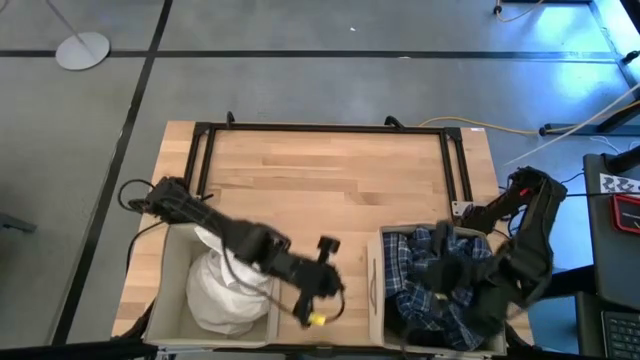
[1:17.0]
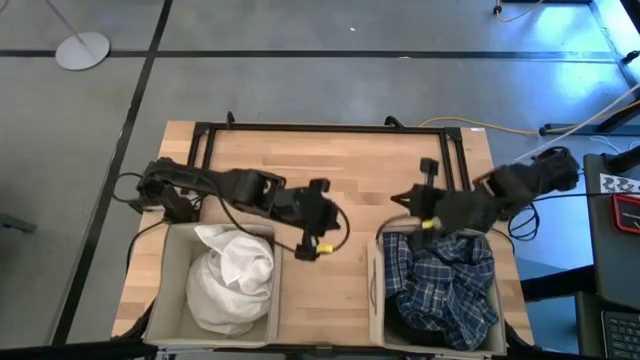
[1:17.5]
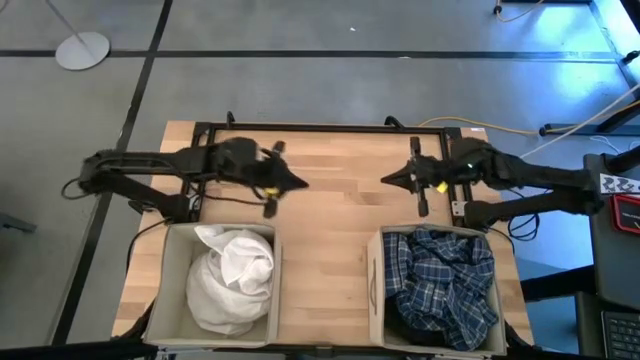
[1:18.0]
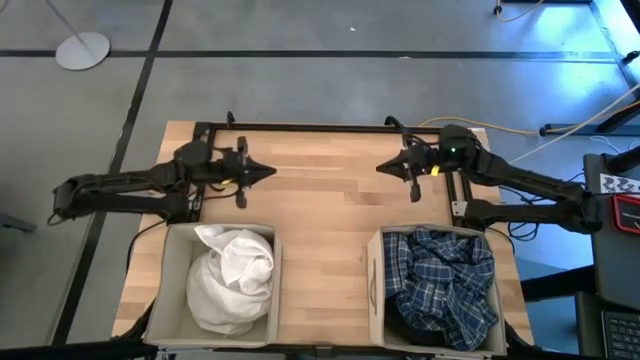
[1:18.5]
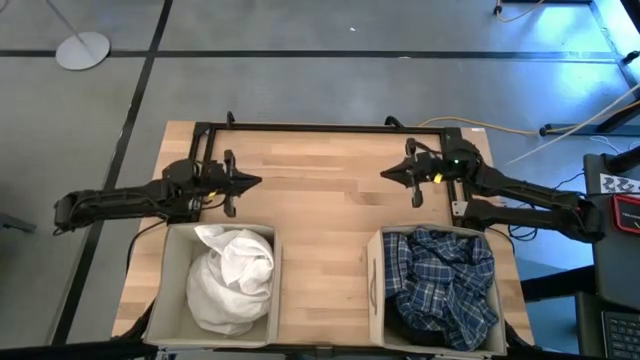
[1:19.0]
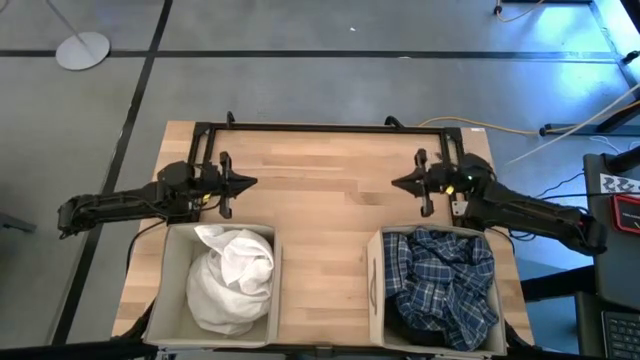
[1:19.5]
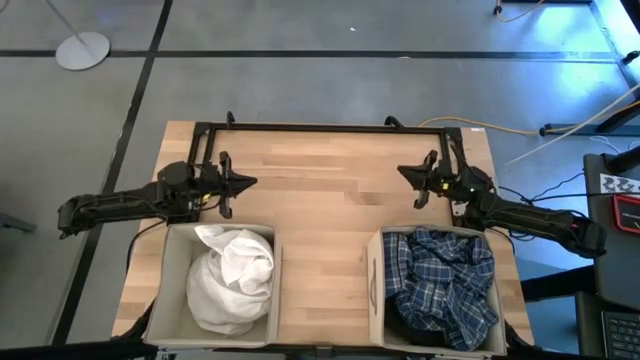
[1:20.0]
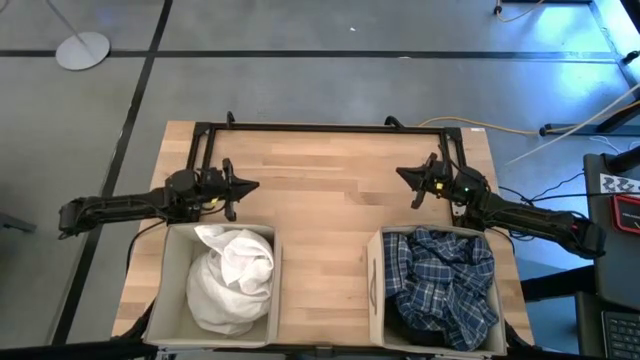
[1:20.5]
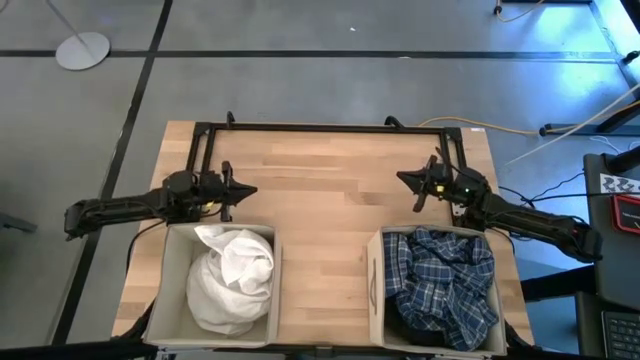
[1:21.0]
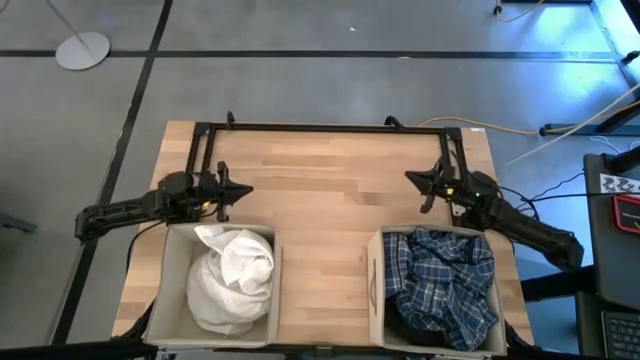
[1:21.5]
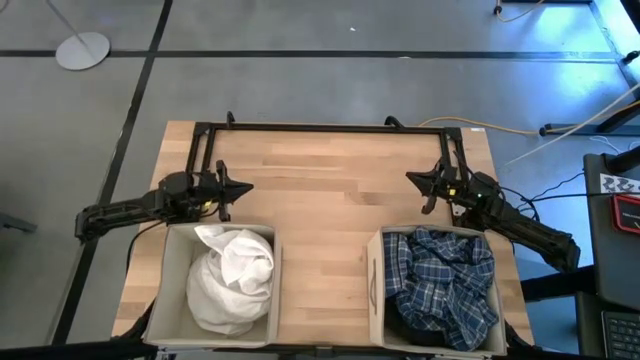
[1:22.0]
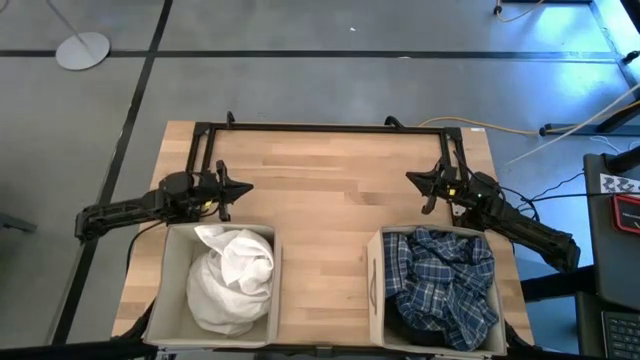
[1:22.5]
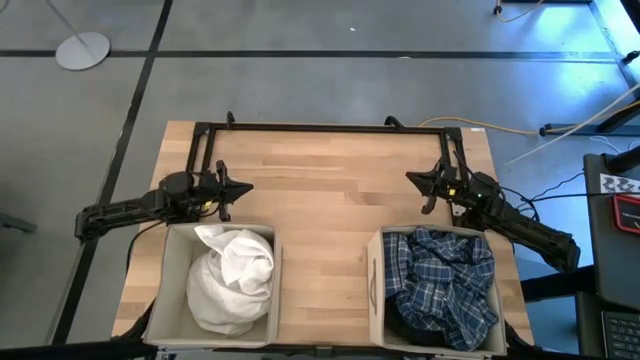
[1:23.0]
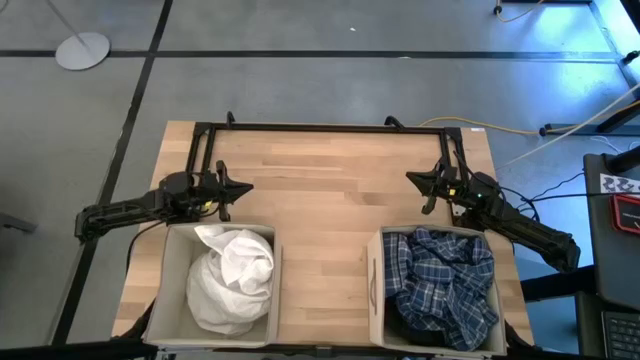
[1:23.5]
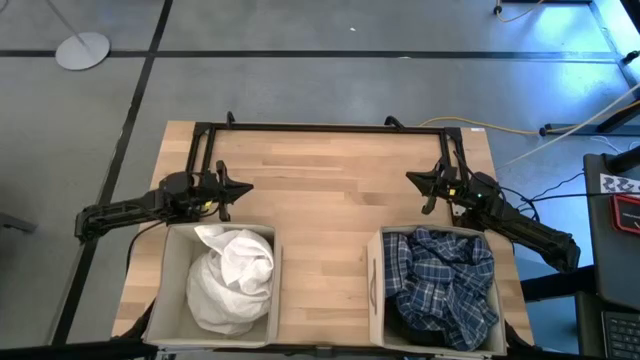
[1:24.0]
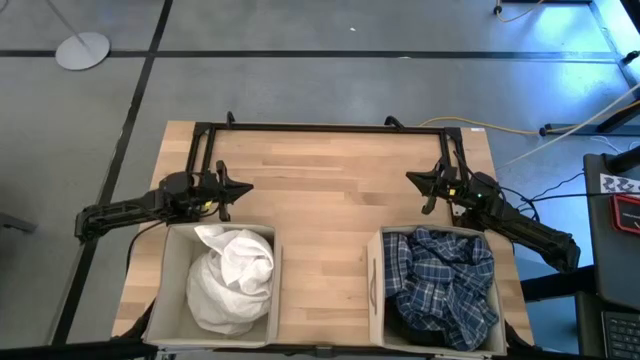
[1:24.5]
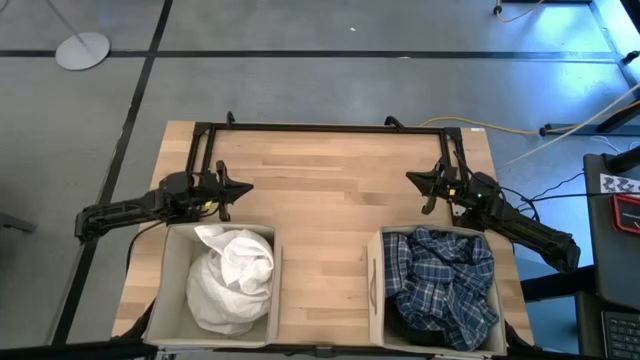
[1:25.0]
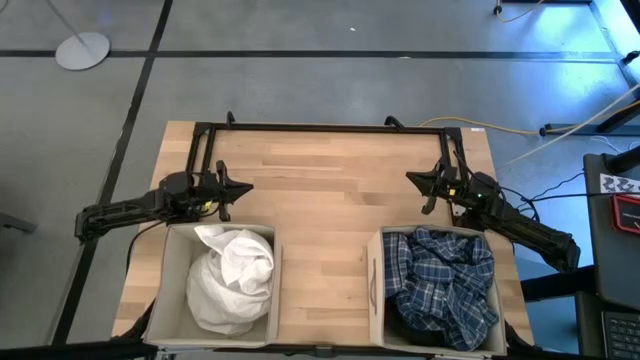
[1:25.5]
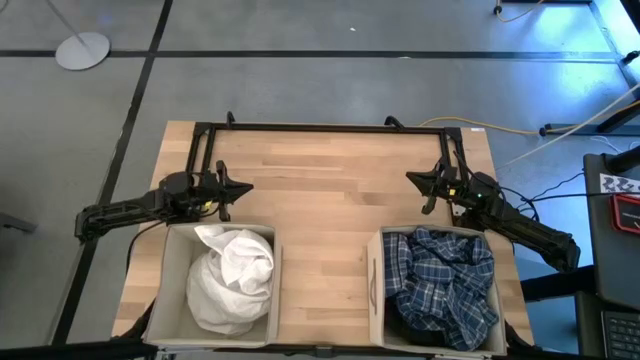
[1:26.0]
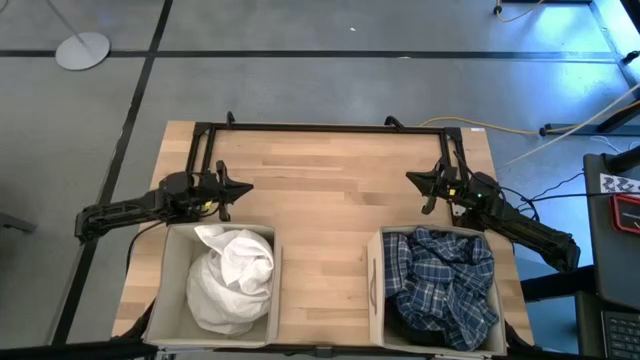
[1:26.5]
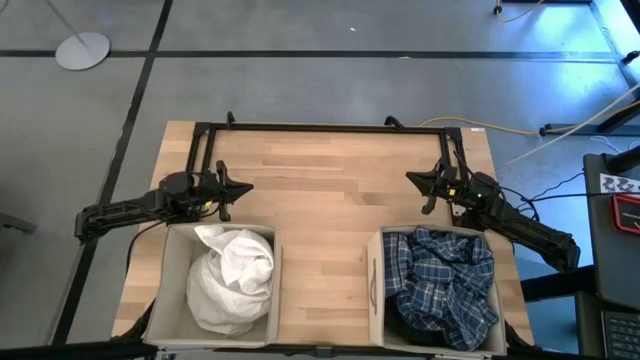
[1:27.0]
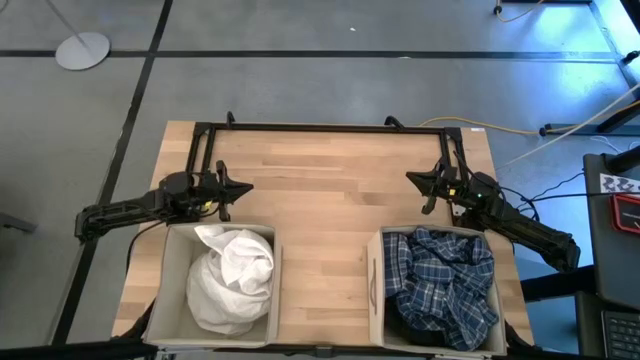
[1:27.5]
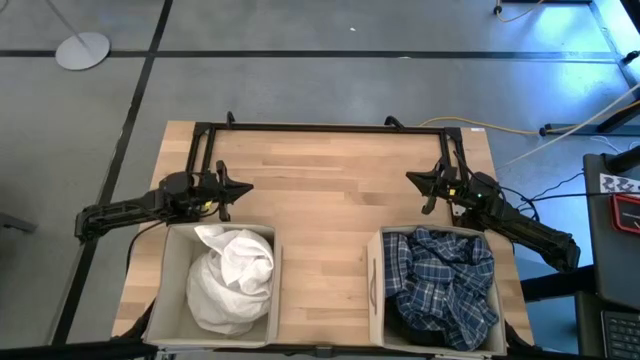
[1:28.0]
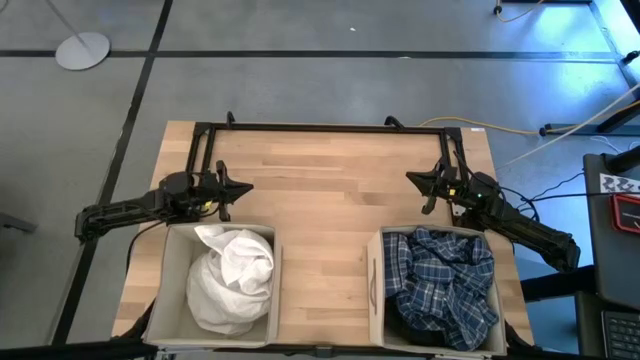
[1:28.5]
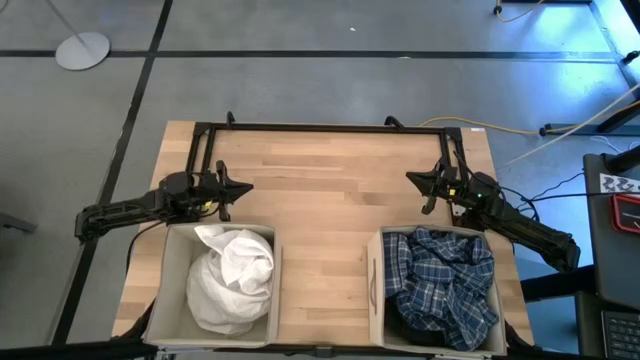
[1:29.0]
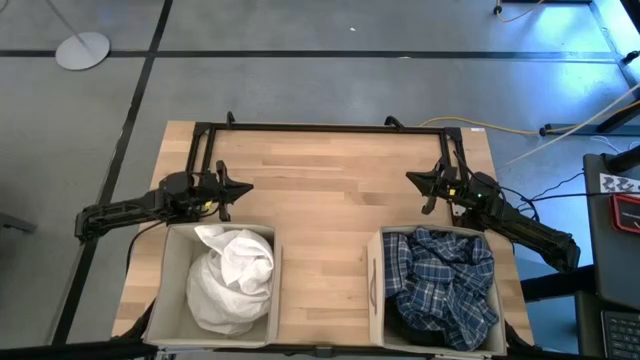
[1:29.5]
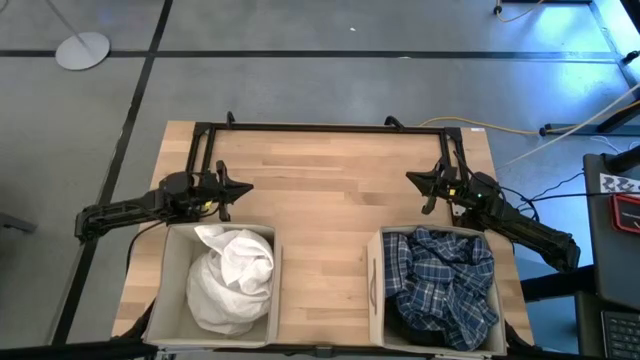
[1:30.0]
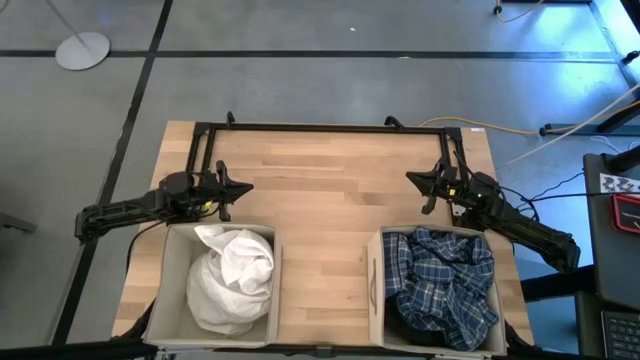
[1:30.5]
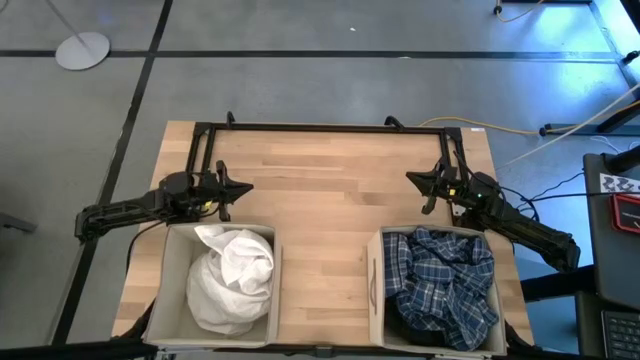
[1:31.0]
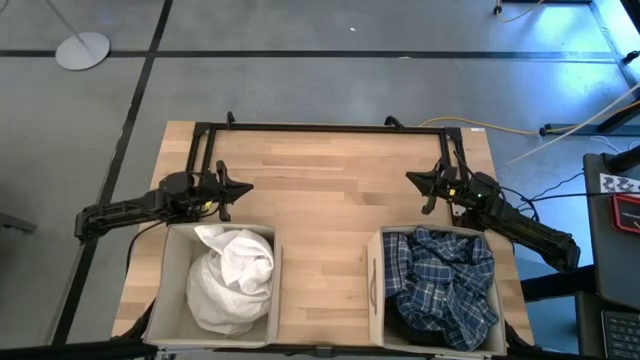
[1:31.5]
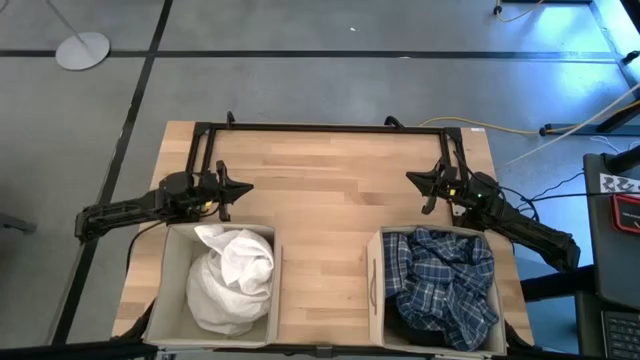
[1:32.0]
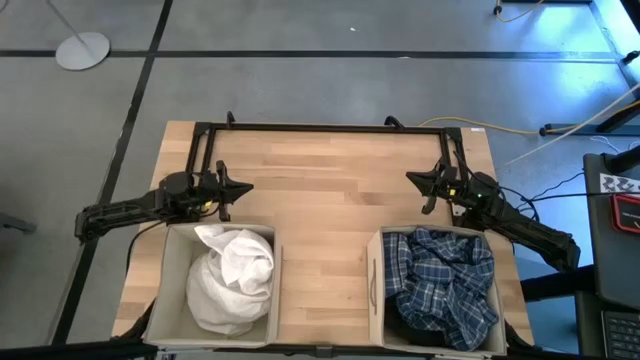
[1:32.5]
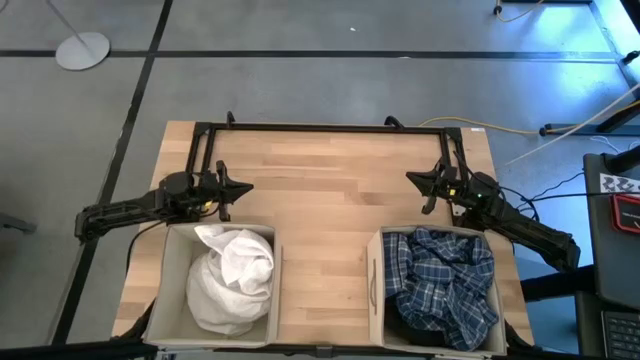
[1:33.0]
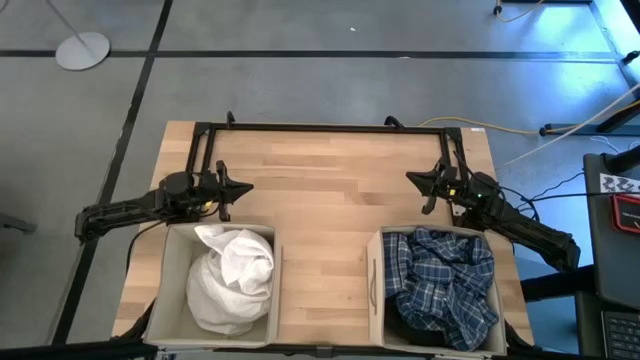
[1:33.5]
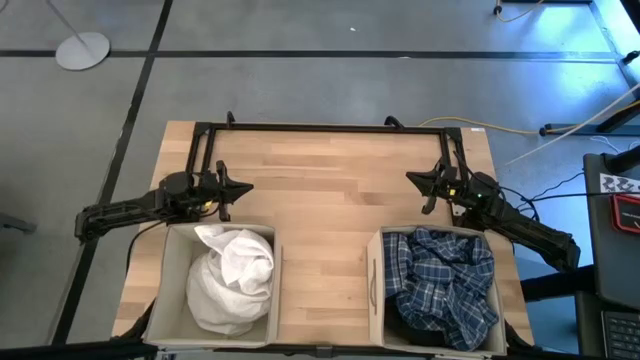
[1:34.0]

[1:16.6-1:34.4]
Task: Sort clothes
Return to Home Position

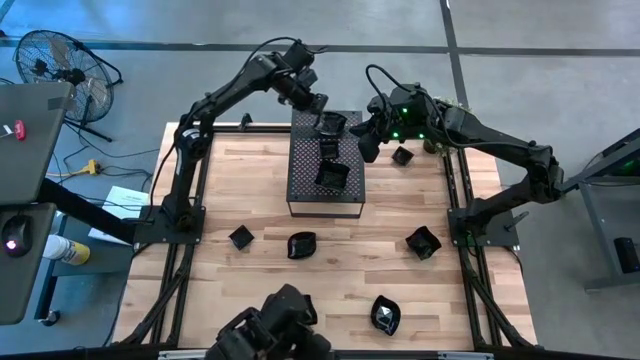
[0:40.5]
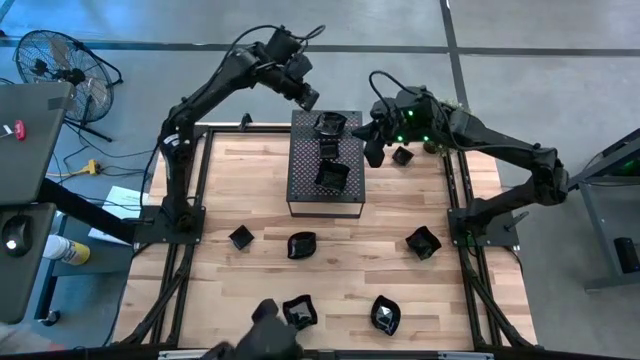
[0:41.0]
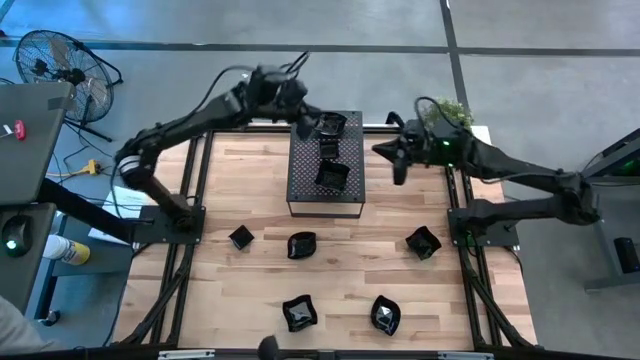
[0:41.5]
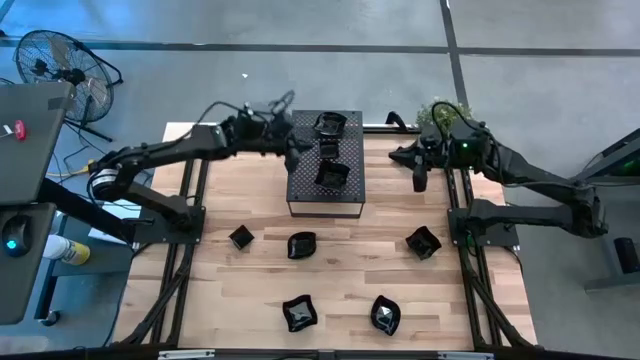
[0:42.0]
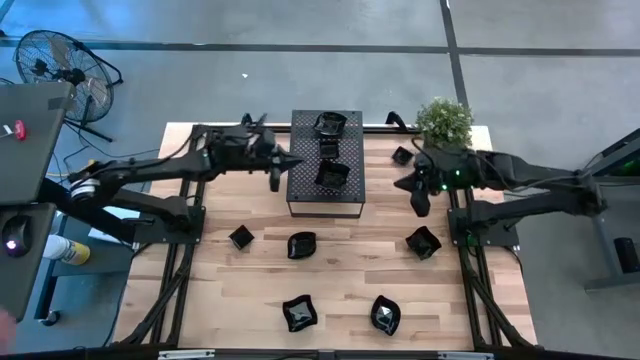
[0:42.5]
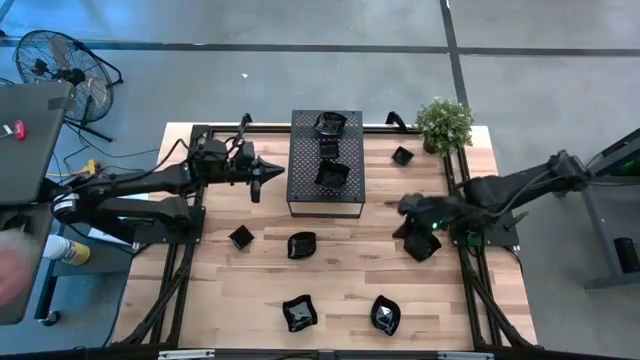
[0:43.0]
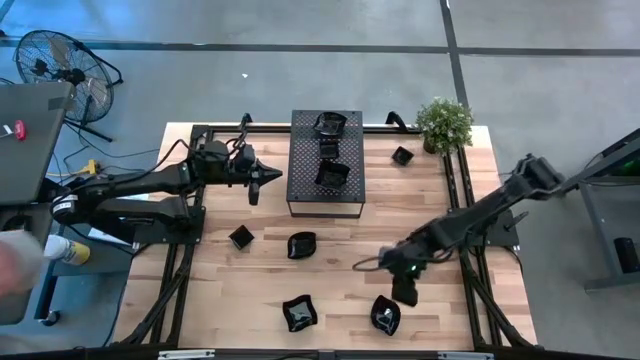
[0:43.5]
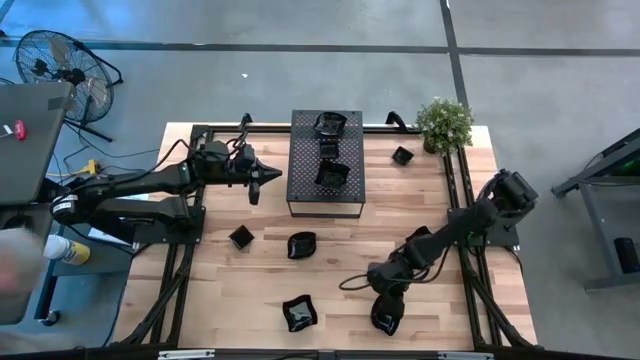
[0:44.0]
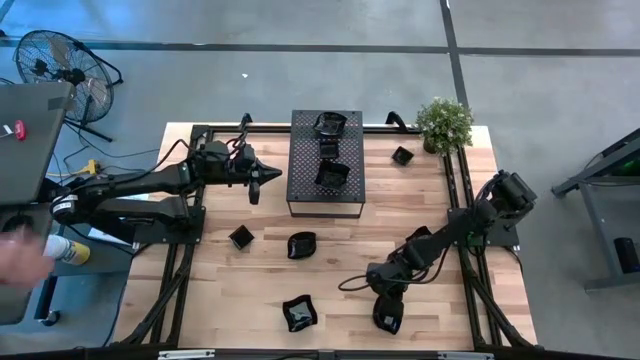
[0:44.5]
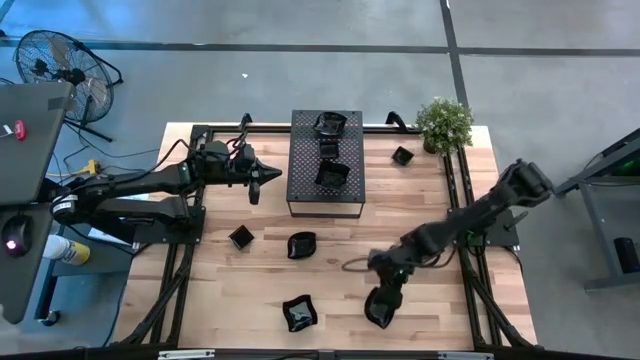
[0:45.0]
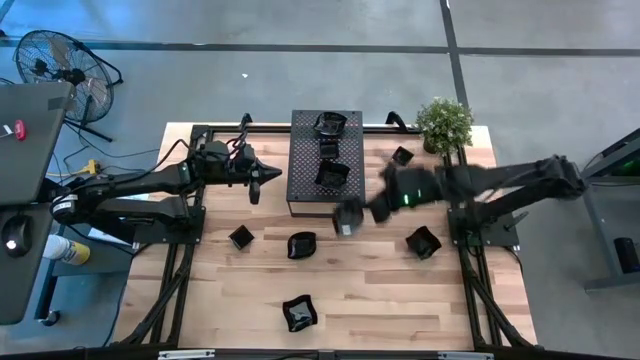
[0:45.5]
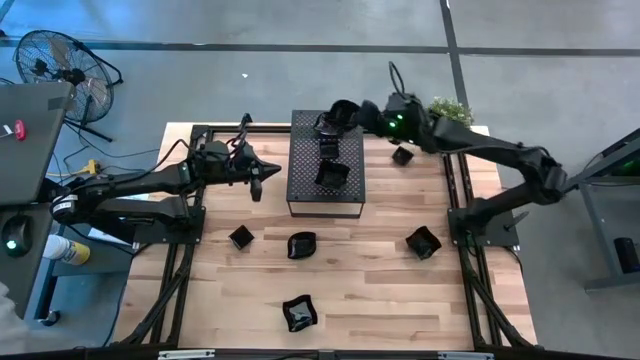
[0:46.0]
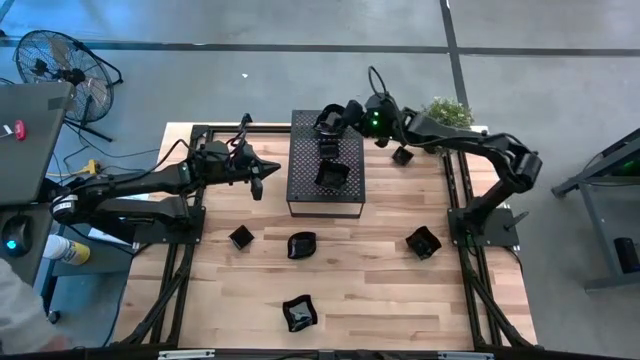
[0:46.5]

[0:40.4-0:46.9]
Task: Pick & Place Mini shaped plates
Stack the leaf-shaped plate on top of the stacked leaf-shaped plates on the shelf
